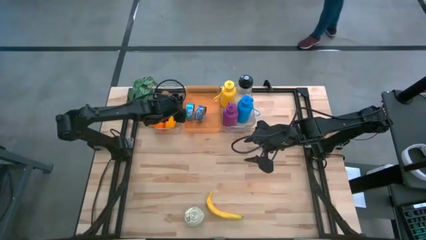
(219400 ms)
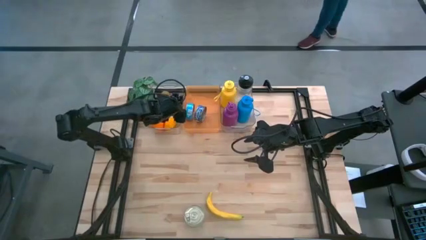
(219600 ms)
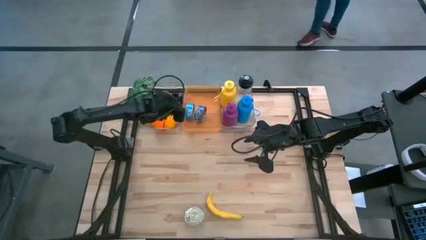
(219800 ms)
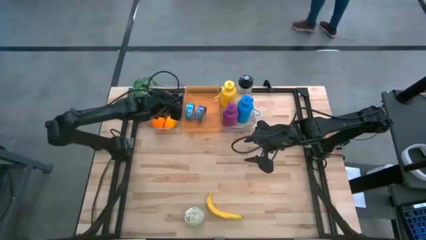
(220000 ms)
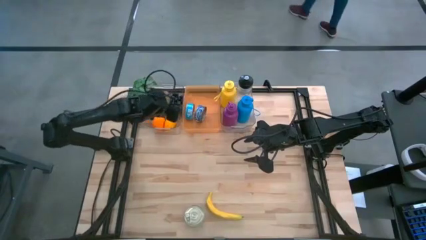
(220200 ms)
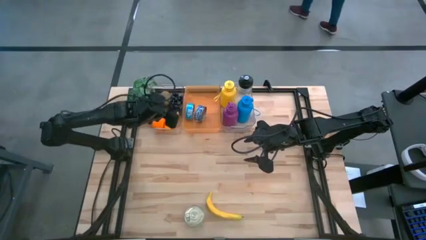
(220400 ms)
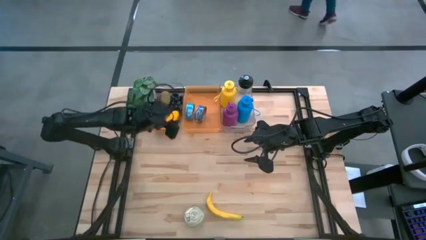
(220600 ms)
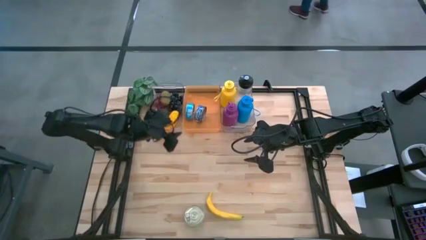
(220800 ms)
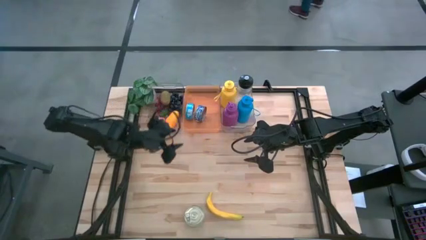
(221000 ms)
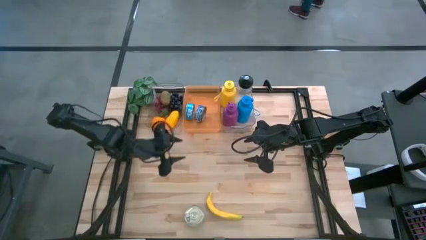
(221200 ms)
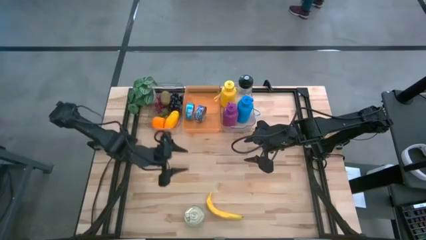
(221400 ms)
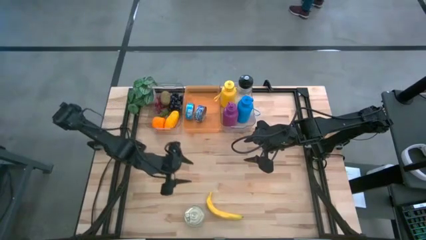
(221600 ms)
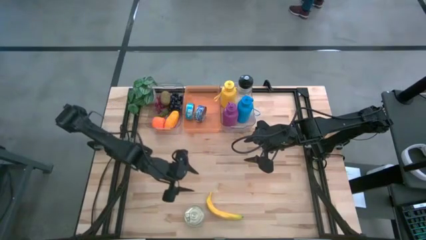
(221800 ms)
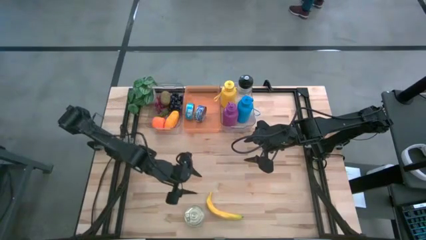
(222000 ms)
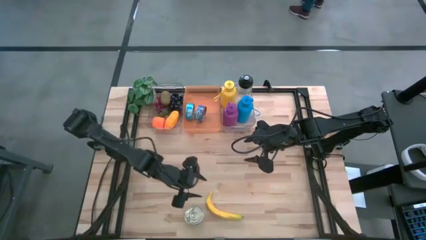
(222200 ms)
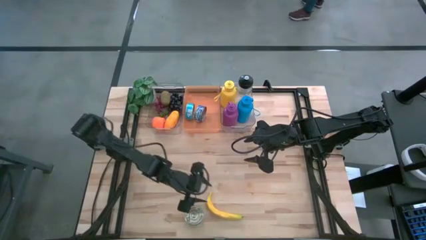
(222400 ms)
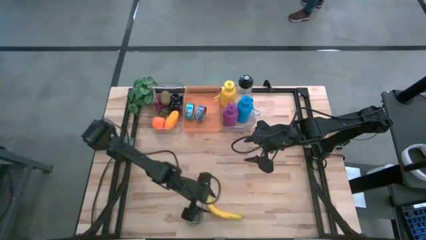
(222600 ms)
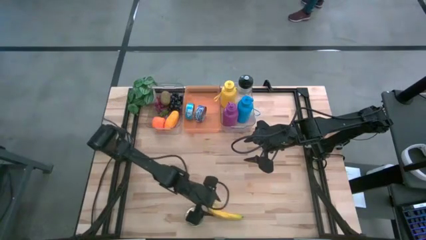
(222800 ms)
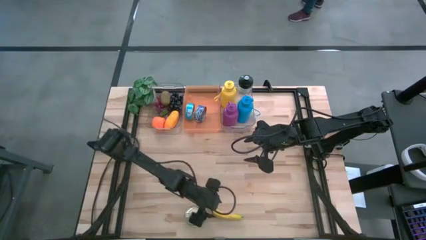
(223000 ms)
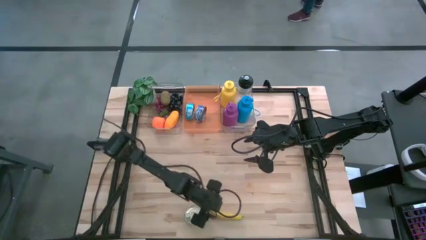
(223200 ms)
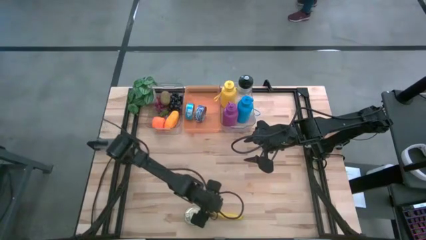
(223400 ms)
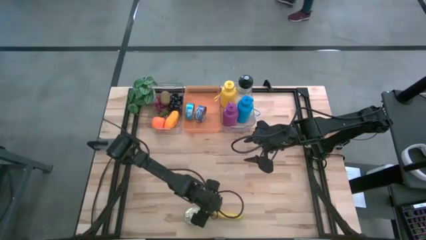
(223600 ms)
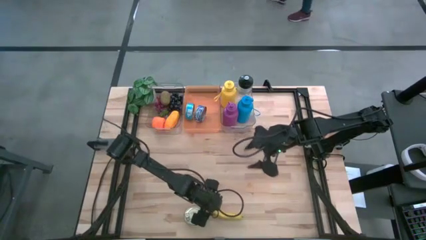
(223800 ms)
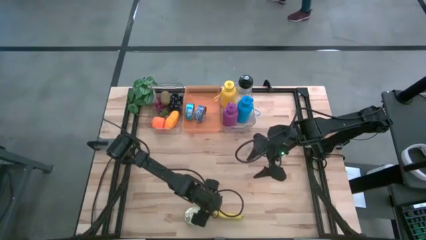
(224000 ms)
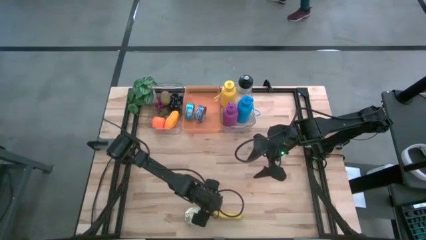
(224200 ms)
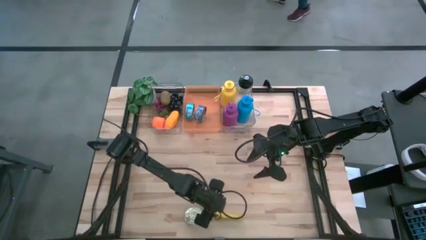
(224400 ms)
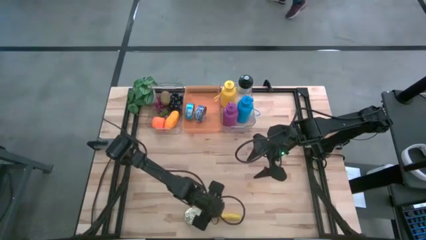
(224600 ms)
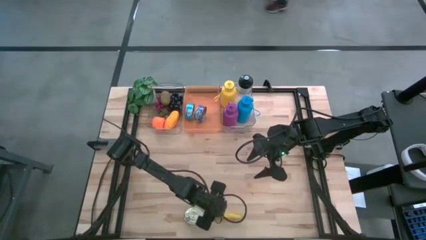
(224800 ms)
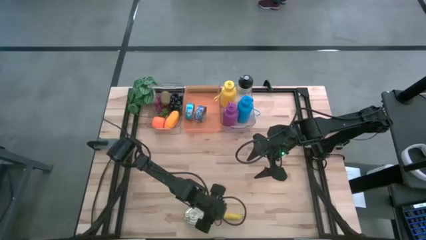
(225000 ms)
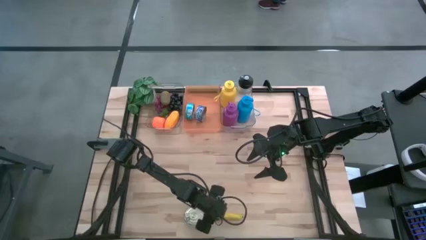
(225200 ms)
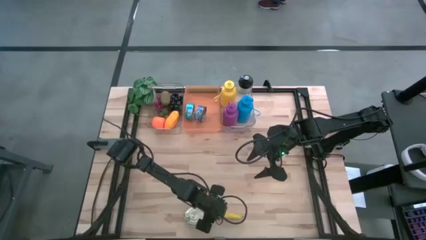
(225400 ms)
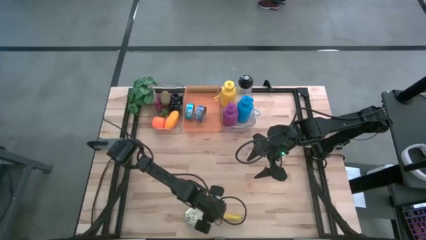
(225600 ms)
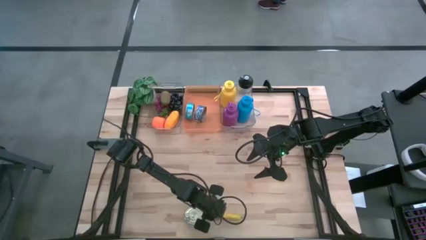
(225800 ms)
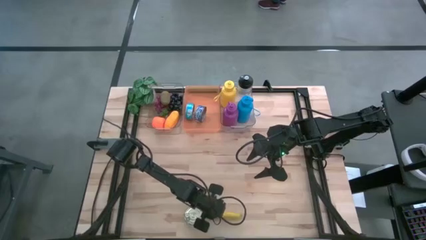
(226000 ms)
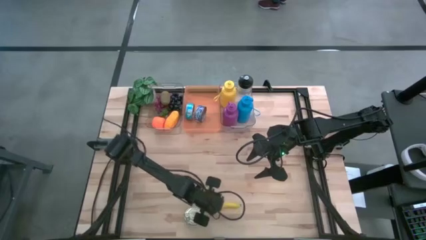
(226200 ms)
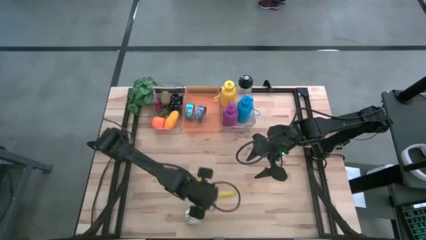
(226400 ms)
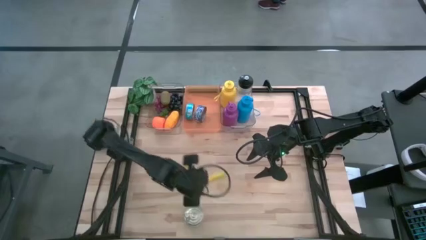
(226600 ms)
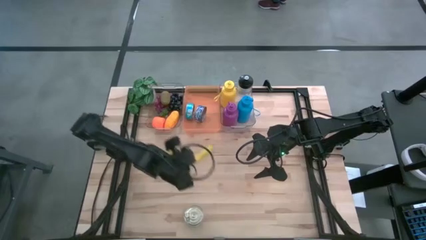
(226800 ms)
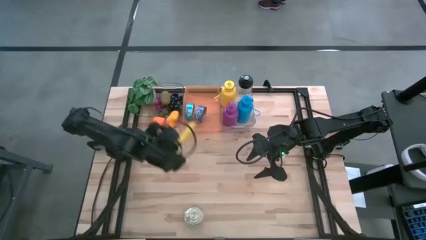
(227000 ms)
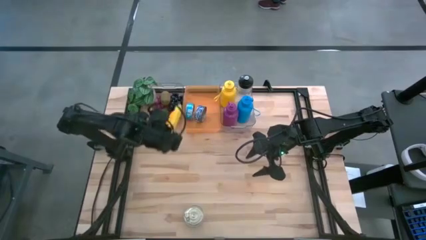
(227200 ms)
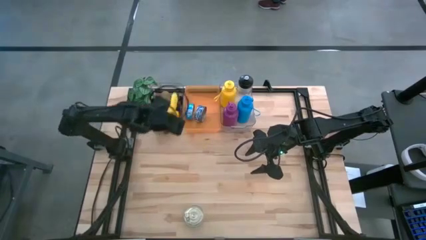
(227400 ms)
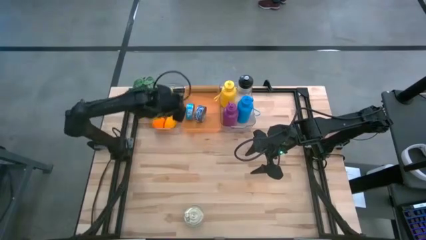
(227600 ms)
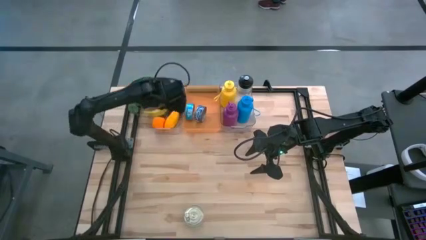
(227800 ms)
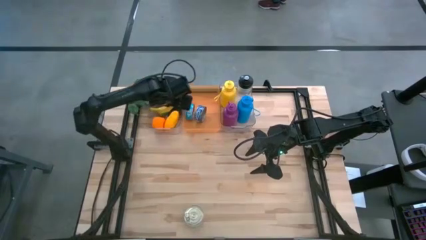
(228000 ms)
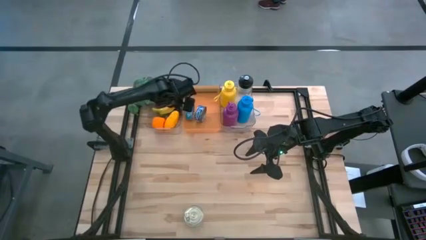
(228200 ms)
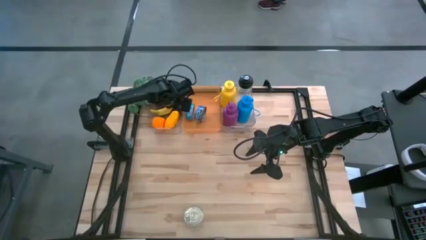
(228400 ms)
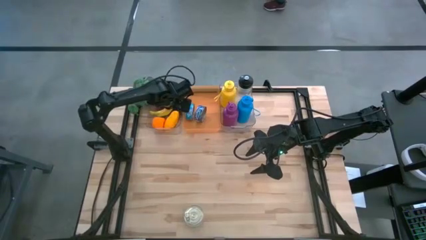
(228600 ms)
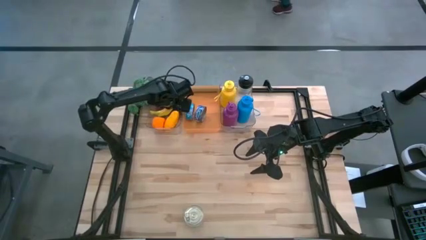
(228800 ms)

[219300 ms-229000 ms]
Task: Pick & Place Food Item
Put the yellow banana into the left transparent bin

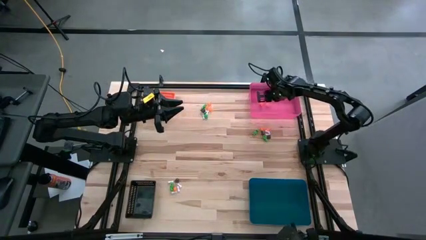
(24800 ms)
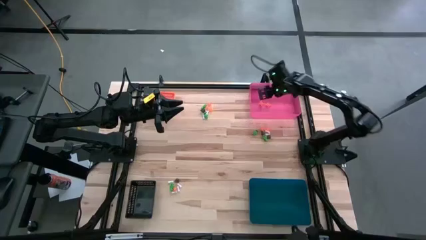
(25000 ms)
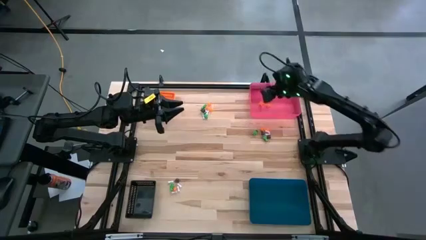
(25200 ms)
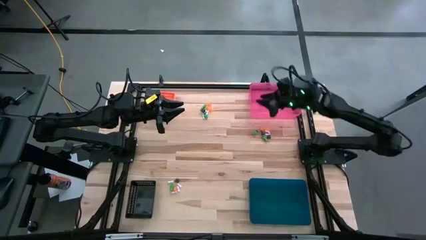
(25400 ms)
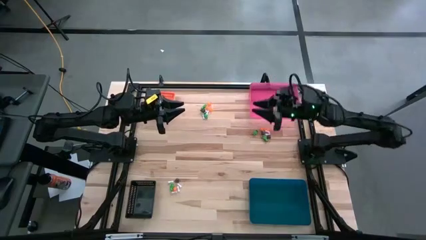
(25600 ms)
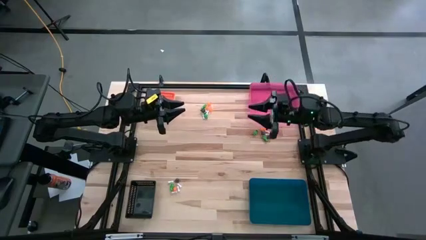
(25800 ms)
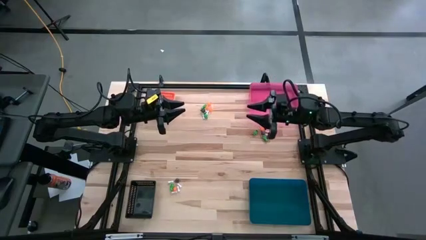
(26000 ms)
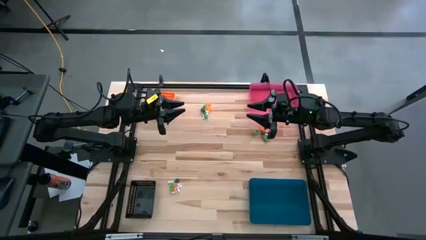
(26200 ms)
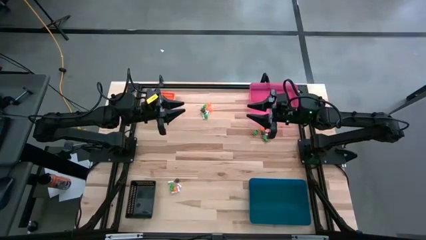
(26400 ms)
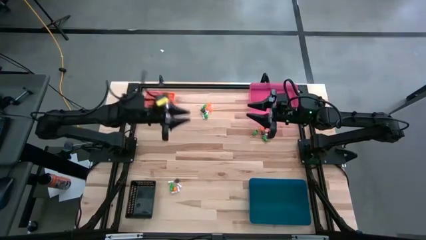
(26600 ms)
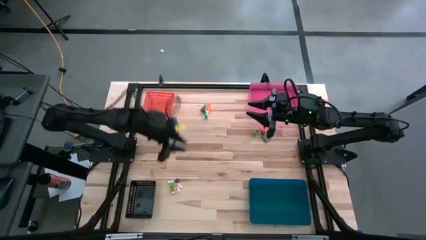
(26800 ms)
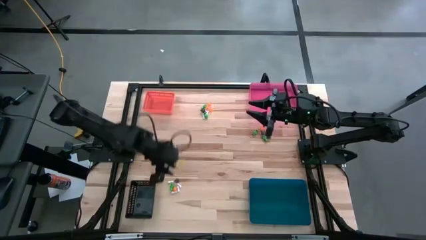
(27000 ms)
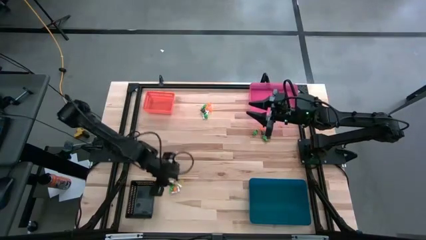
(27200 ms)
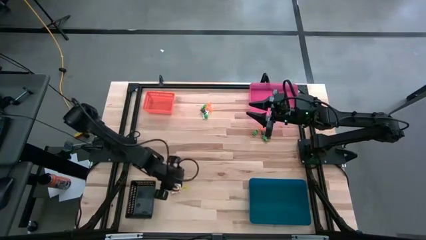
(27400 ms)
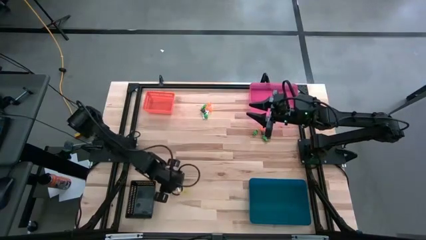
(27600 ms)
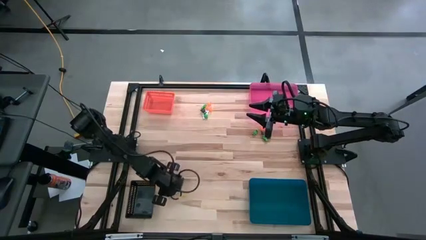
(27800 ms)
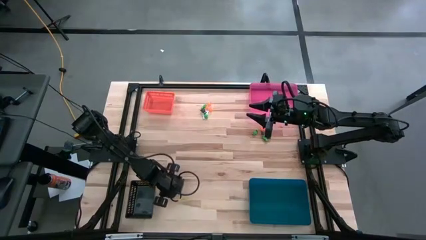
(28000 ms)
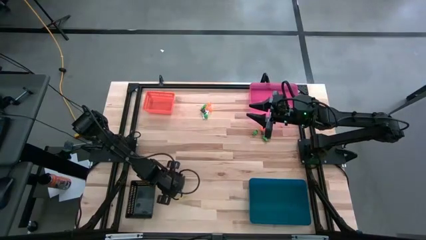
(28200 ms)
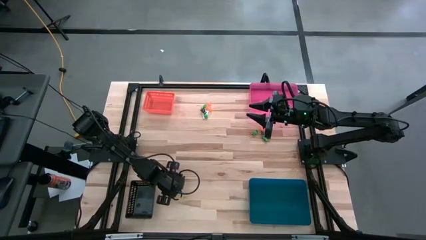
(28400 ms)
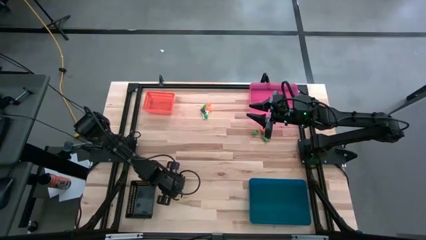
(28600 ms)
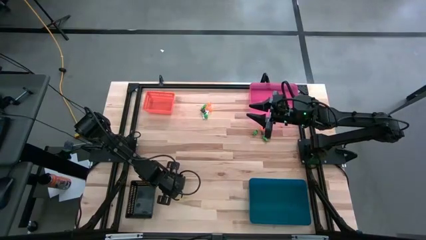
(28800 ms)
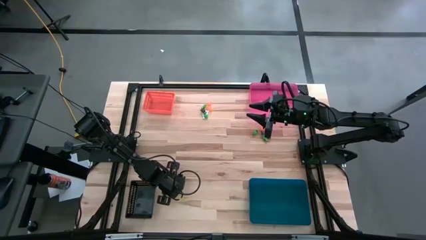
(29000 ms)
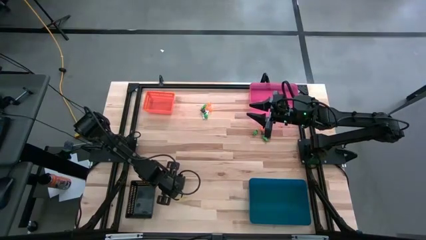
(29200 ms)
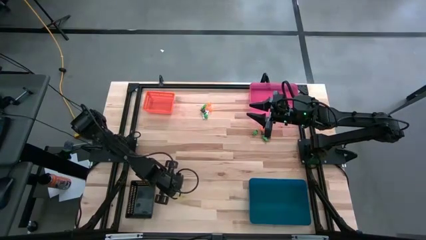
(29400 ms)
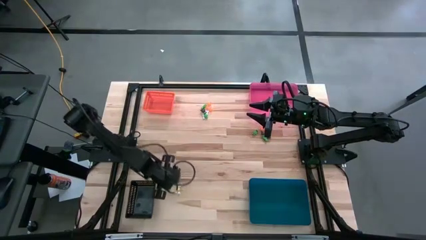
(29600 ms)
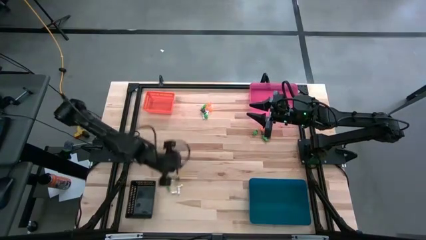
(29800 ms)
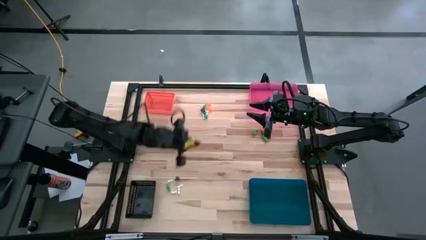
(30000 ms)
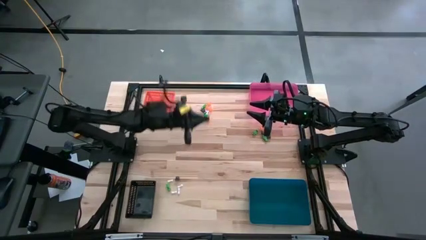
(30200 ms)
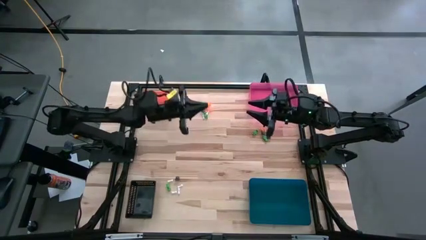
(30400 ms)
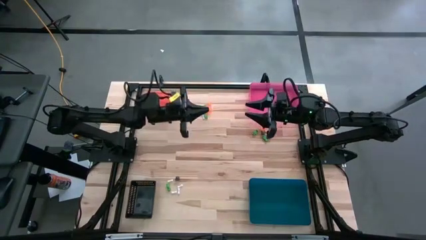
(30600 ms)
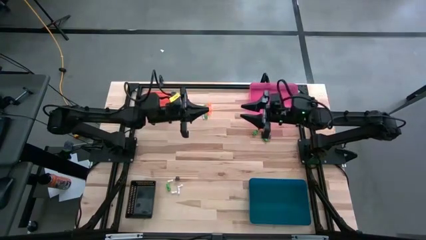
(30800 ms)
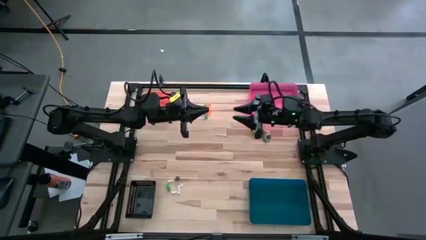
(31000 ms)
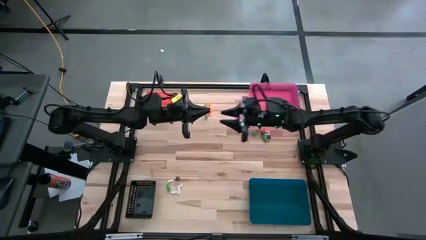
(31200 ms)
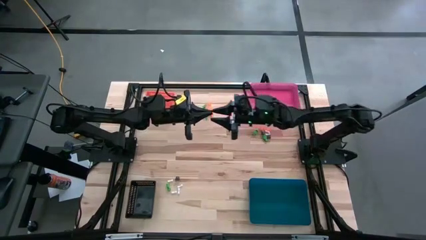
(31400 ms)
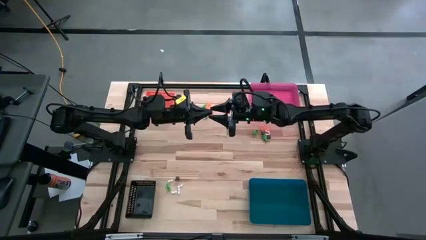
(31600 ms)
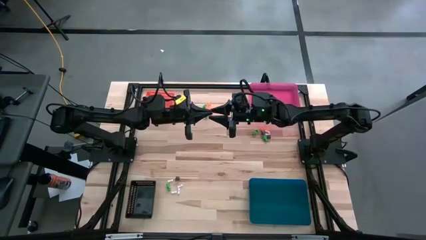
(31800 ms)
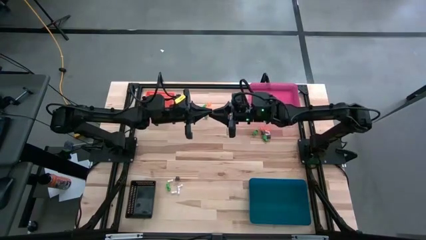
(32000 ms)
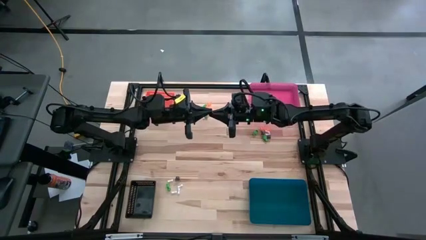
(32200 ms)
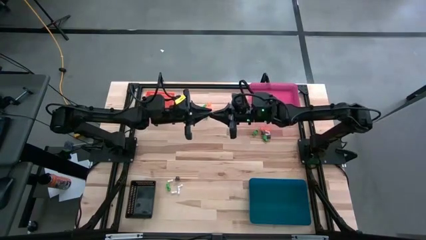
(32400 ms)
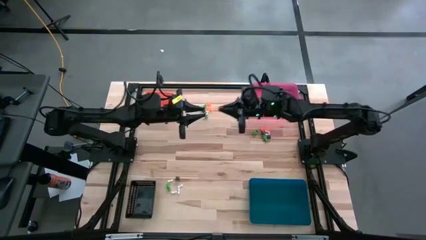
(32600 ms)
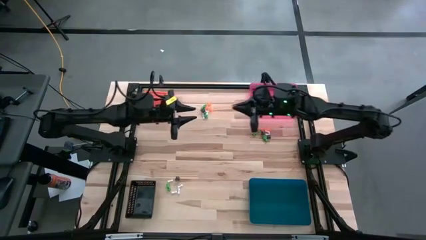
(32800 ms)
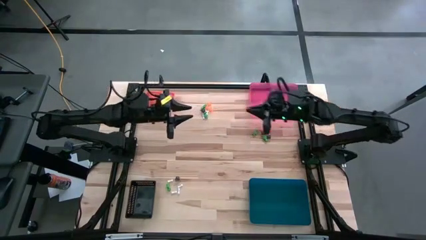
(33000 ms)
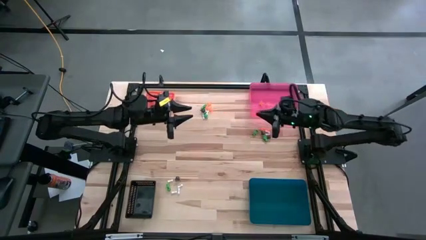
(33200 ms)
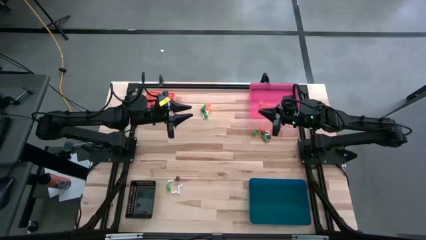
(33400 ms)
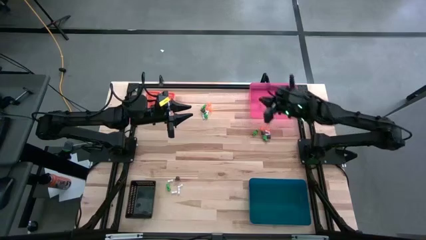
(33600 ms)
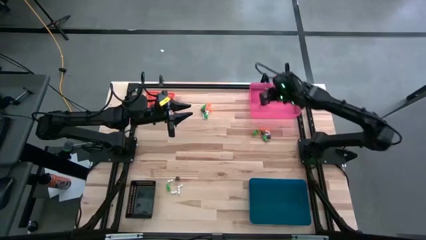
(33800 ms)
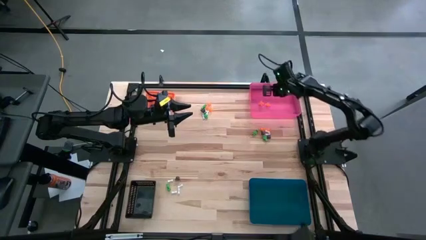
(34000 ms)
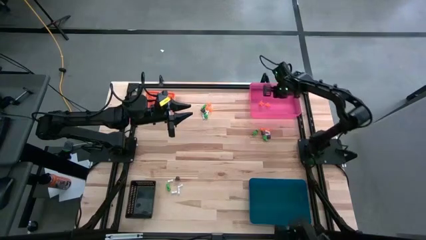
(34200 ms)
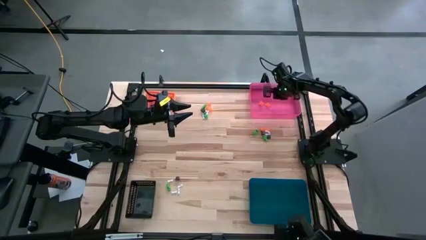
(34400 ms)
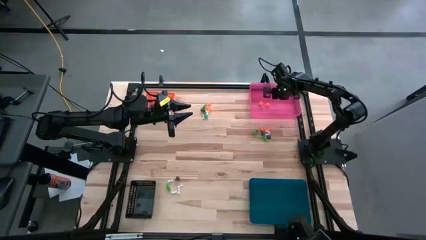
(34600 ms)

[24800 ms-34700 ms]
Task: Sort Halloween decoration
Put the orange spider toy into the pink bin
